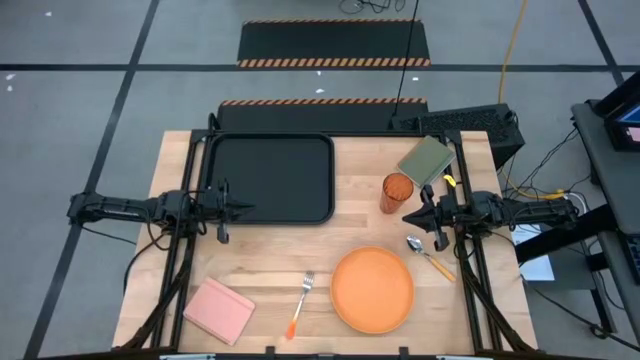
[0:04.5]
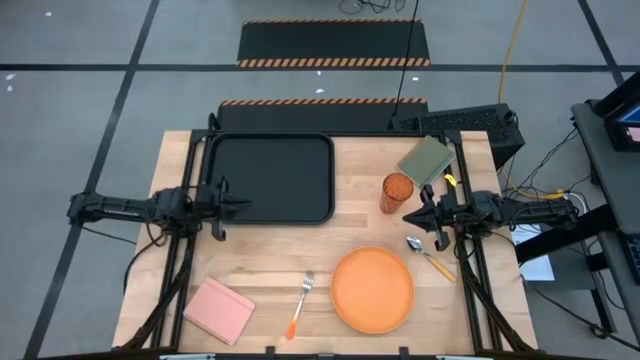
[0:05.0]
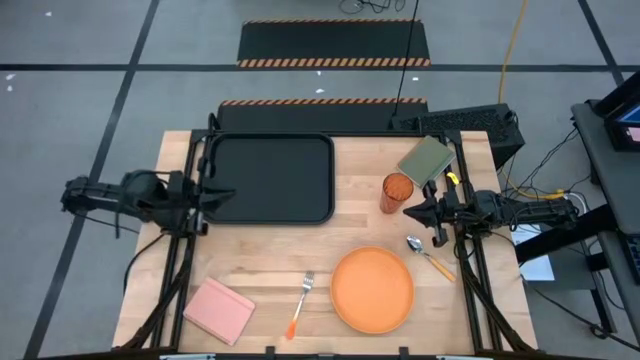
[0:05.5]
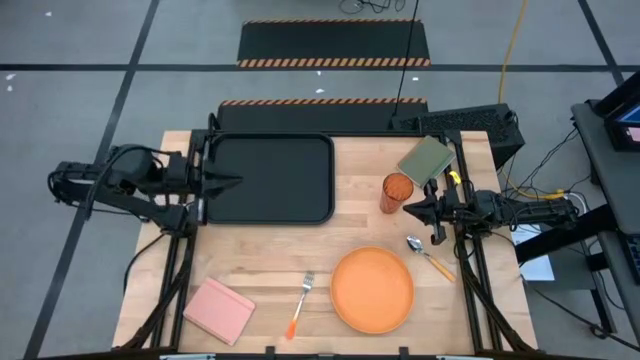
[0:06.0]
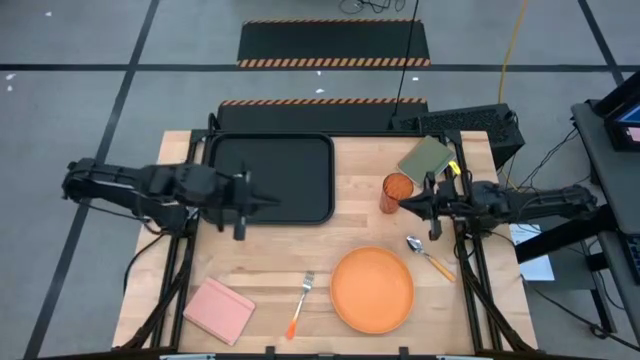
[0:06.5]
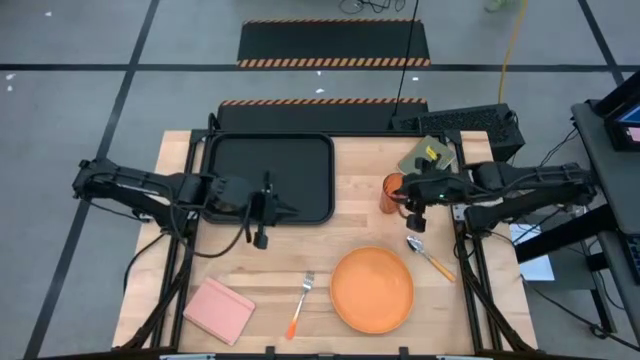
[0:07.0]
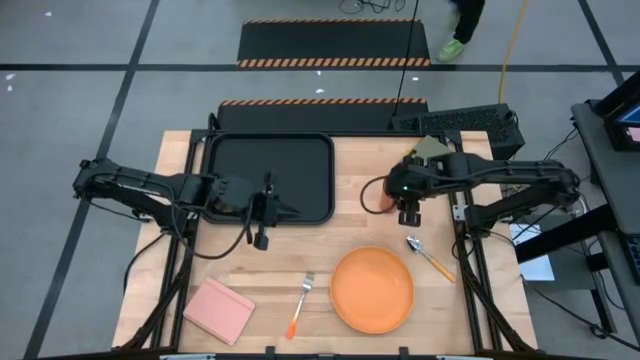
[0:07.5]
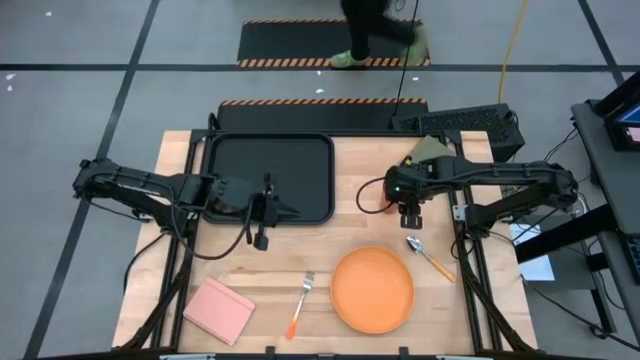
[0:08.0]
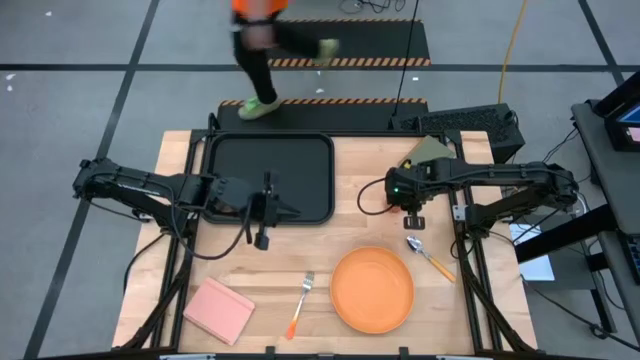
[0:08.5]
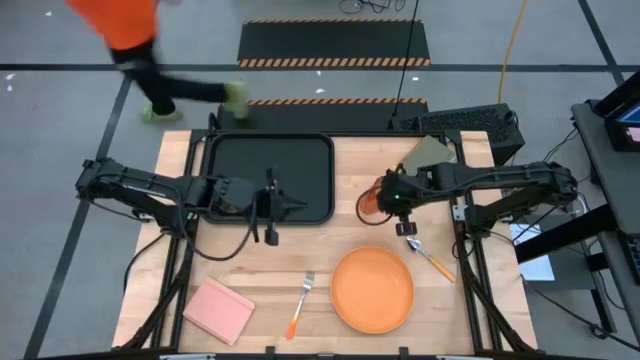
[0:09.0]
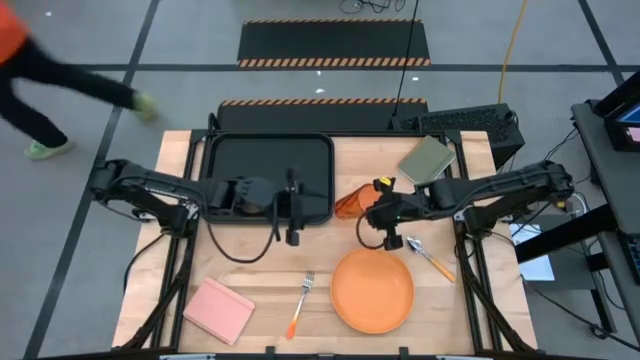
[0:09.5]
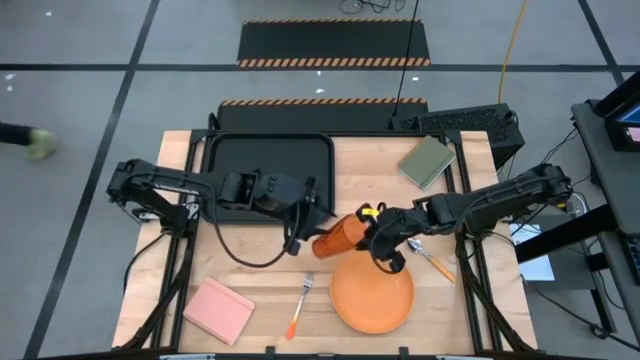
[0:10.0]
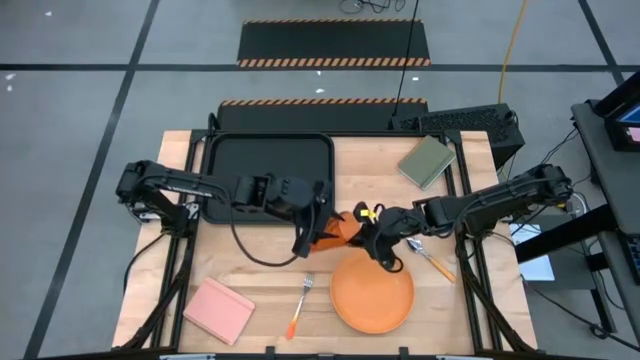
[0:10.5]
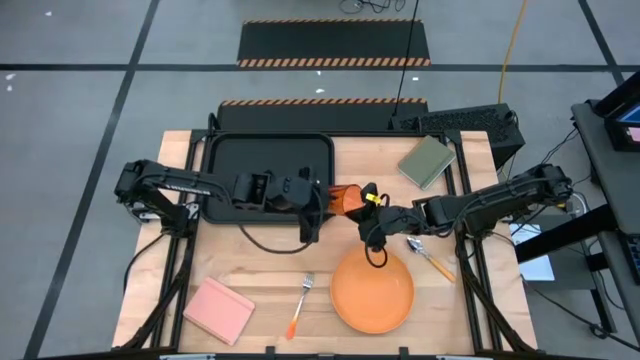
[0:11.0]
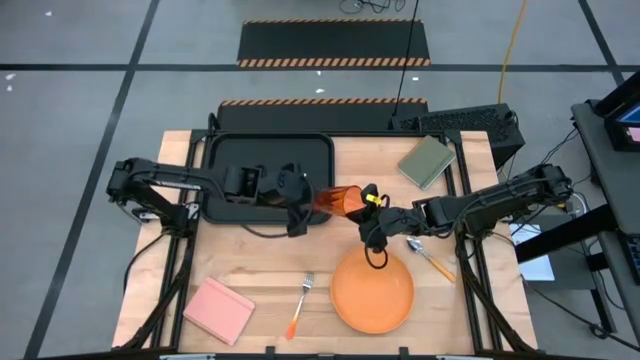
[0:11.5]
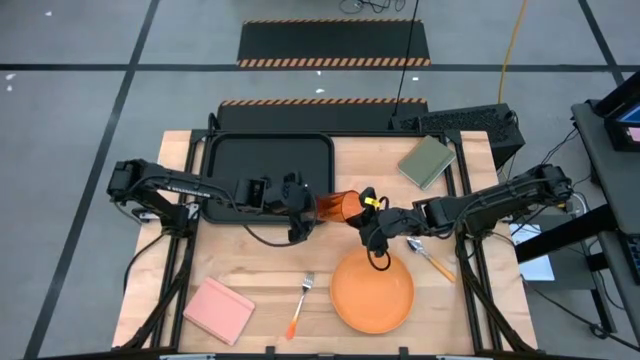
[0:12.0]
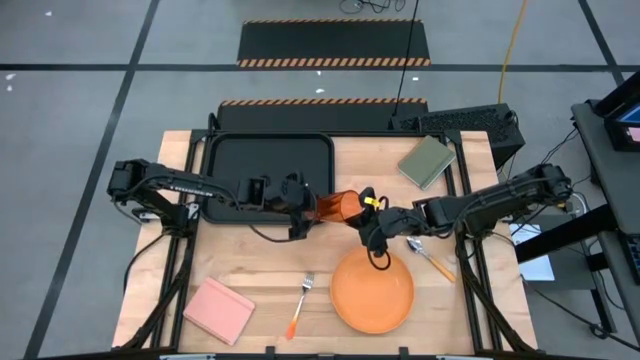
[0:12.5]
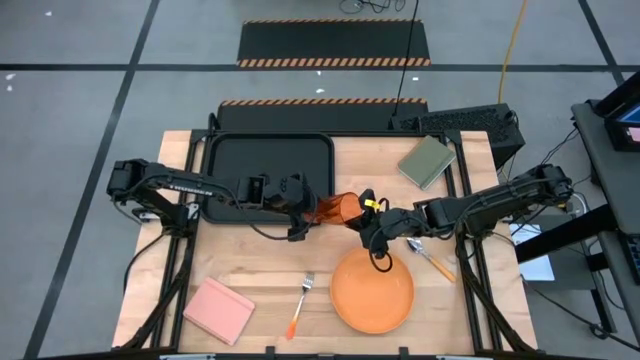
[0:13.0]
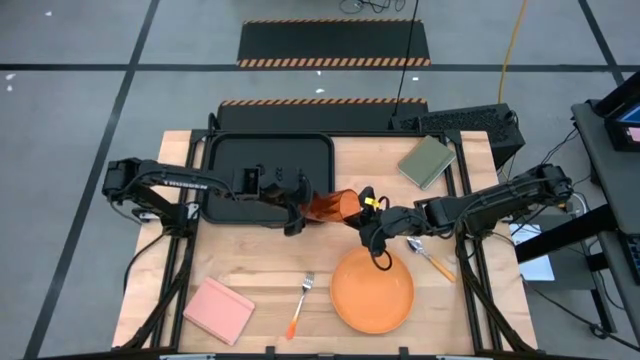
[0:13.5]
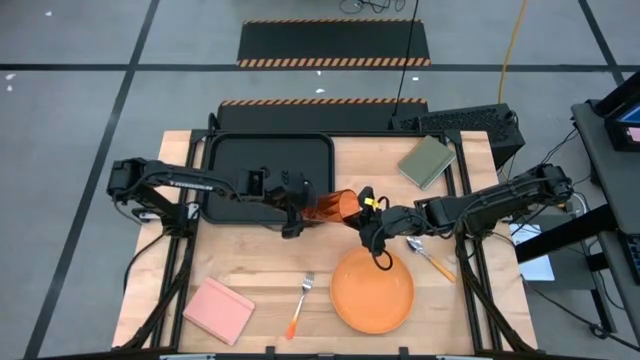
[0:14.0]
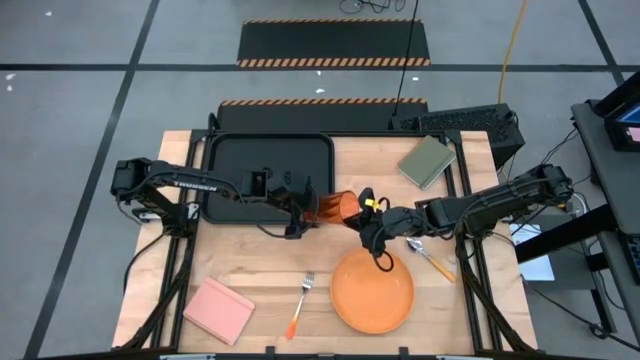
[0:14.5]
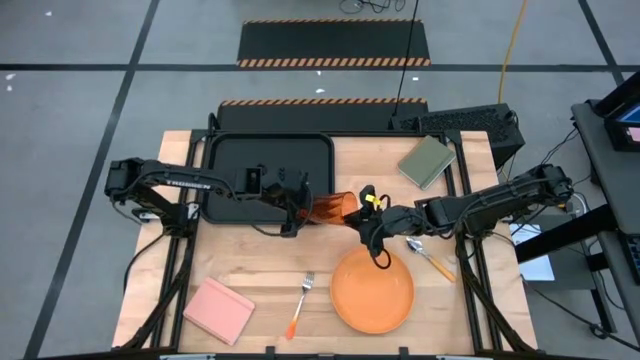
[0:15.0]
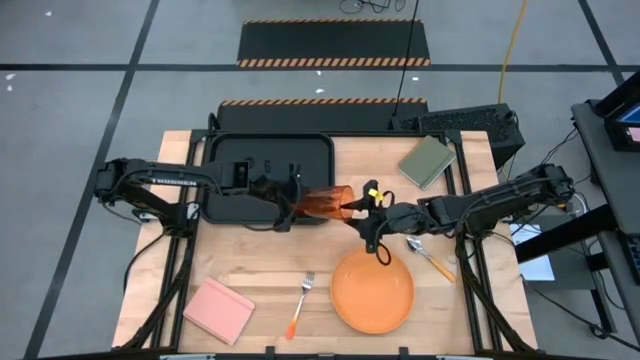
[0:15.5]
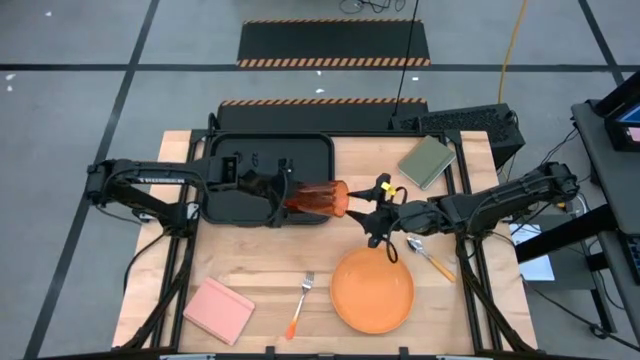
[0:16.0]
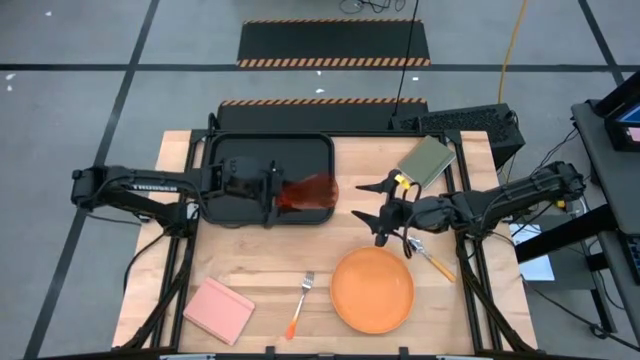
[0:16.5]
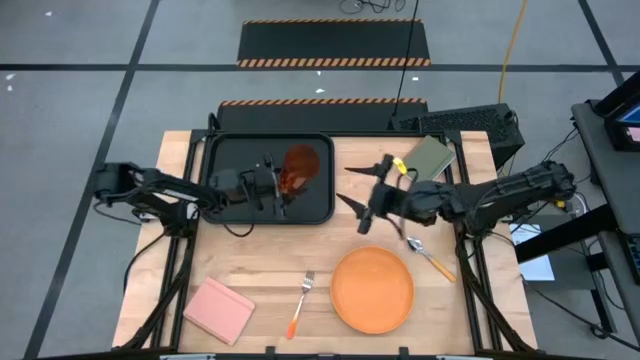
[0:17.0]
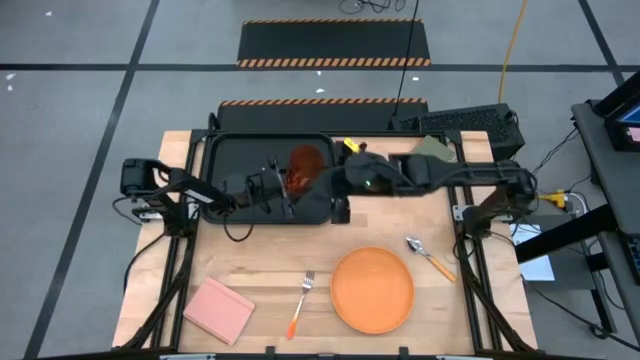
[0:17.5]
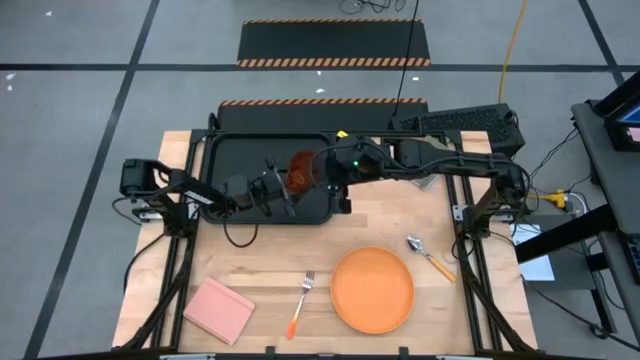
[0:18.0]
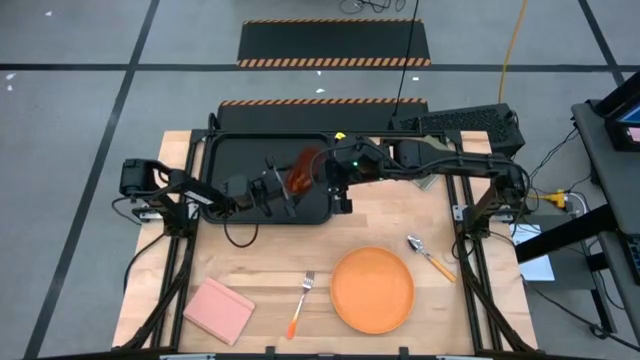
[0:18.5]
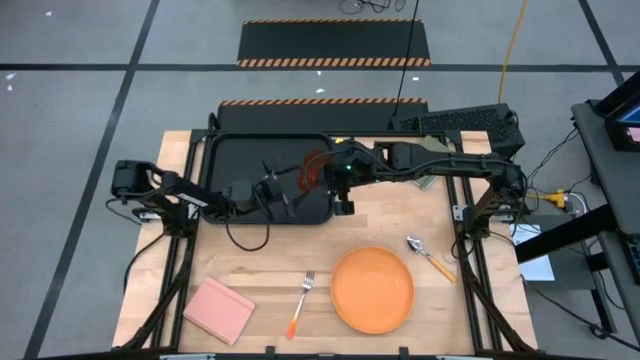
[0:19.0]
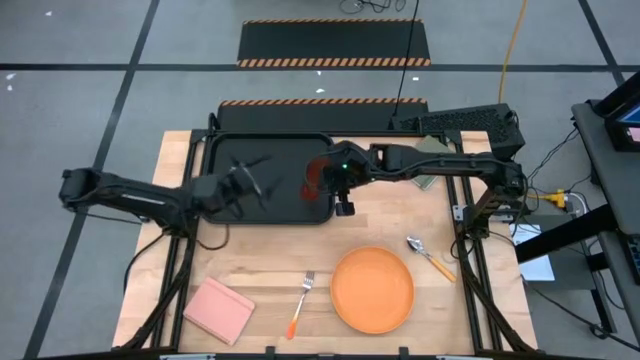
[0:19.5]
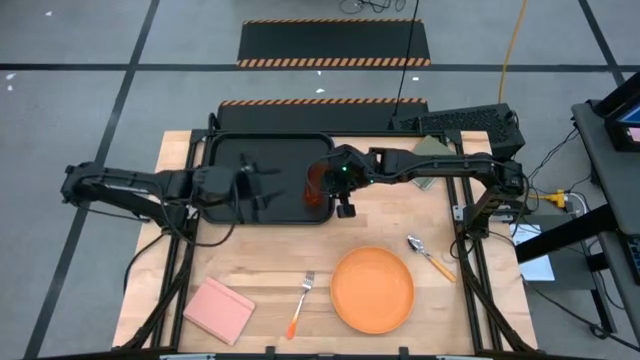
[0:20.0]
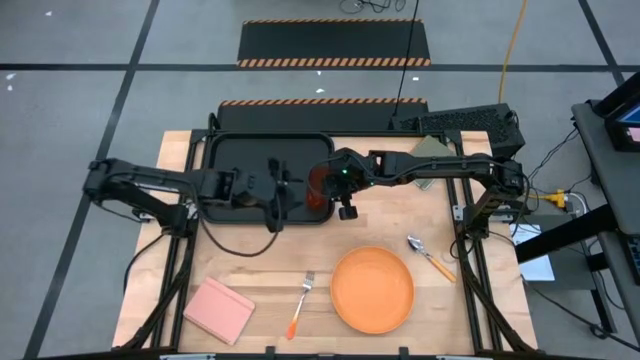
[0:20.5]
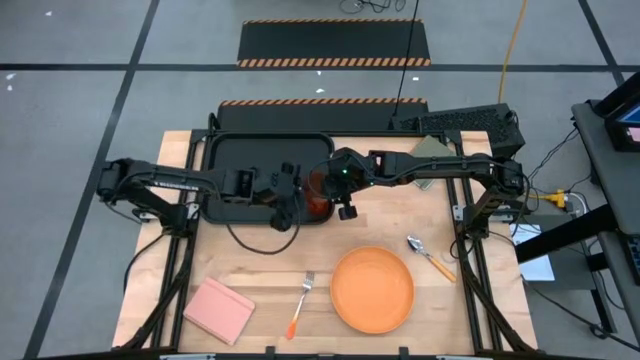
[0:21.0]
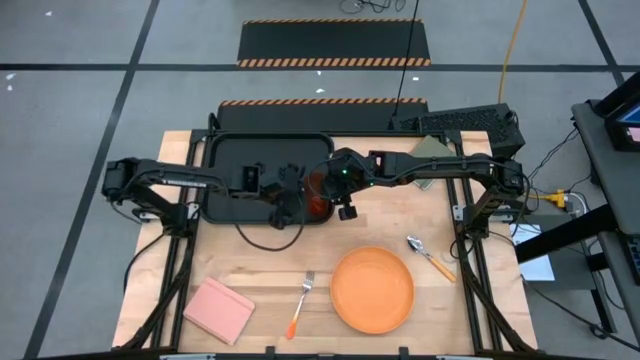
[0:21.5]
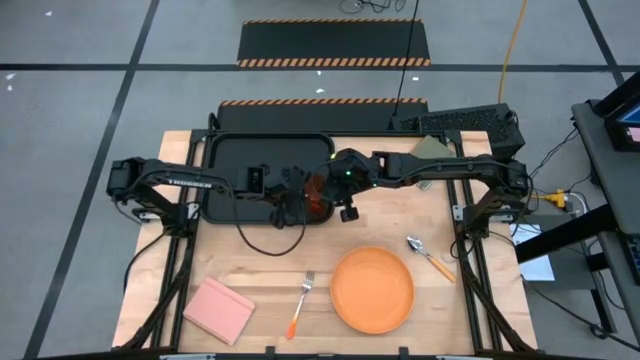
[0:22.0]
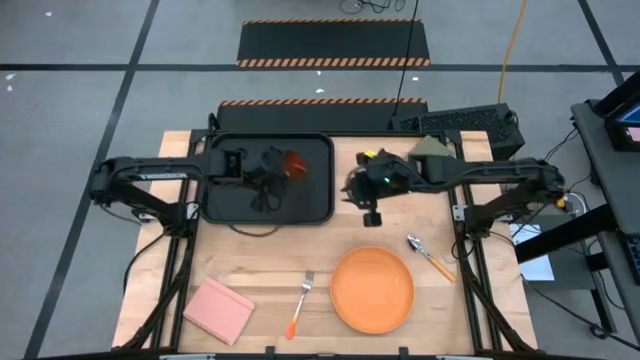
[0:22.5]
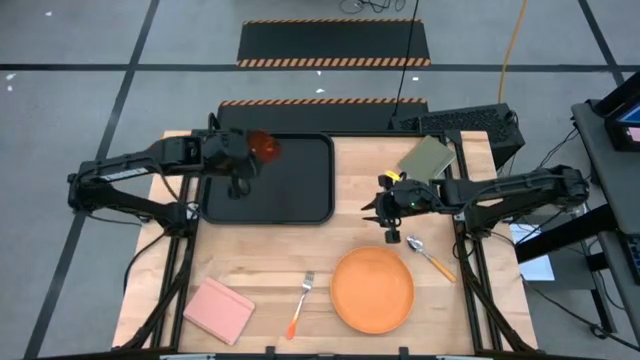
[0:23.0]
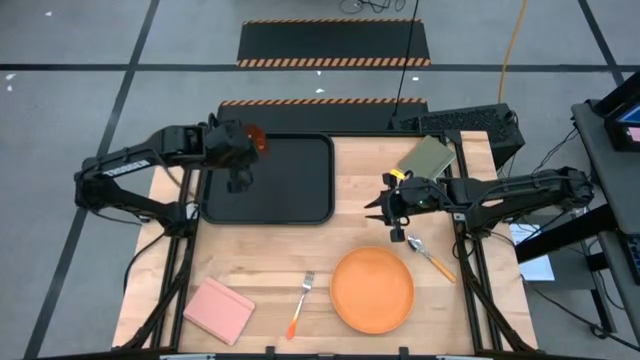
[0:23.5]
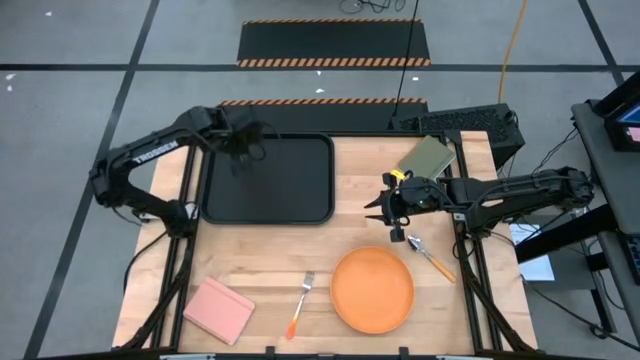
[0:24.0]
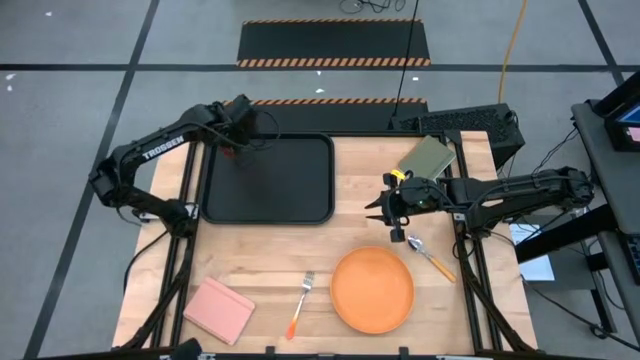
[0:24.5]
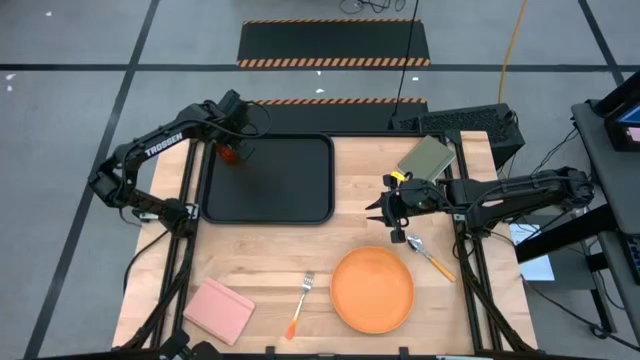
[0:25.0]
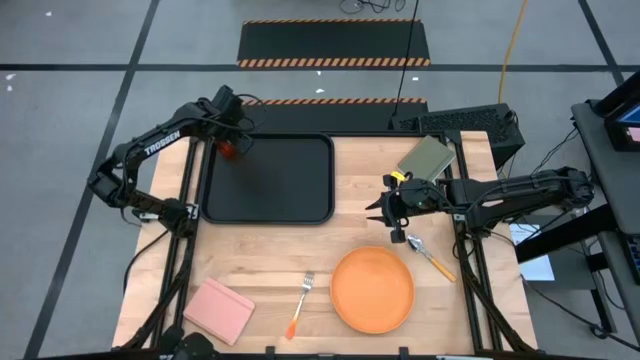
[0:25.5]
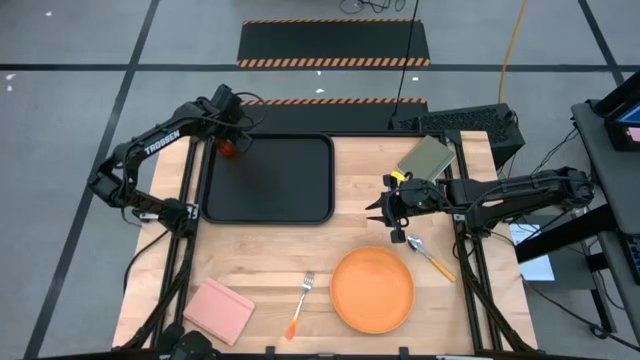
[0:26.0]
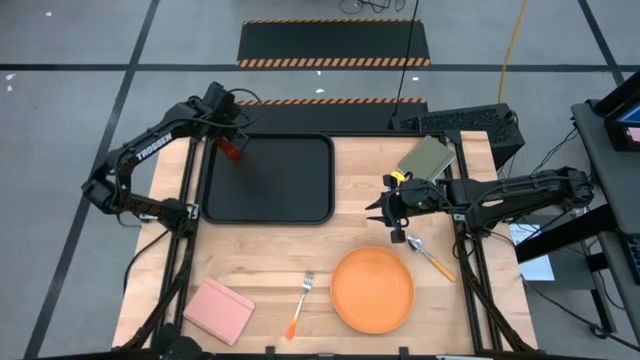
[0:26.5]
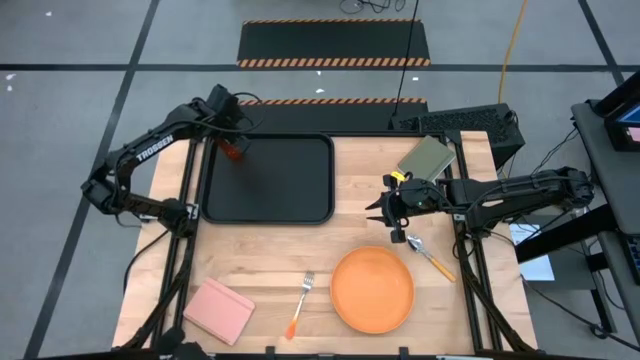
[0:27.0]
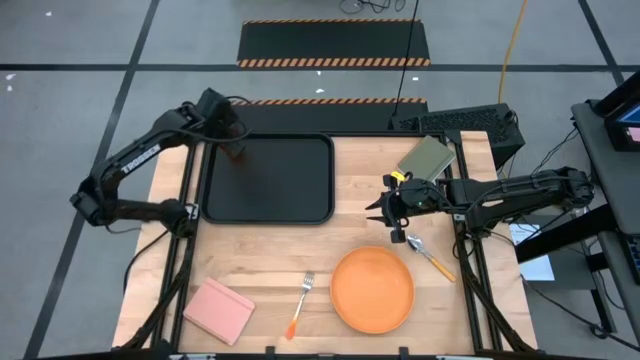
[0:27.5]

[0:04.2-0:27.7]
Task: Pick and place plate/cup/fork/spoon on tray
Put the orange cup on the black tray
